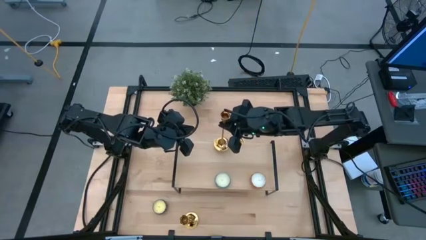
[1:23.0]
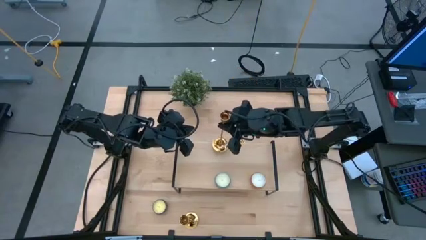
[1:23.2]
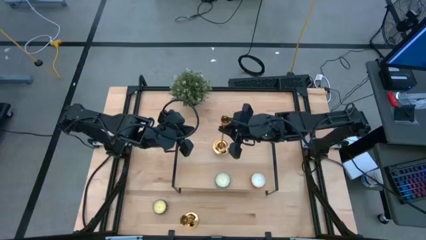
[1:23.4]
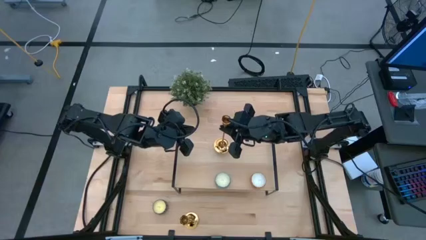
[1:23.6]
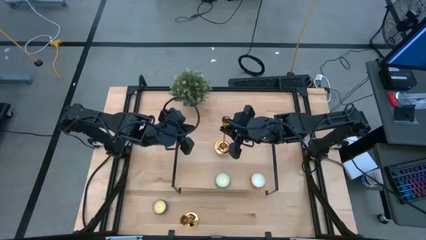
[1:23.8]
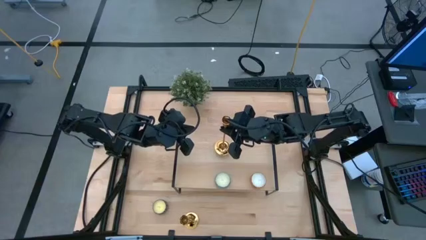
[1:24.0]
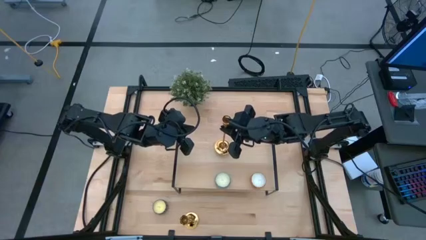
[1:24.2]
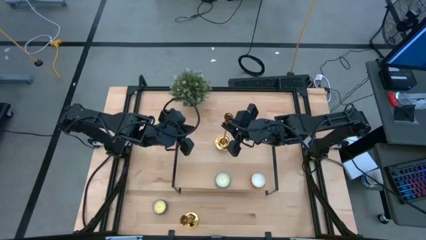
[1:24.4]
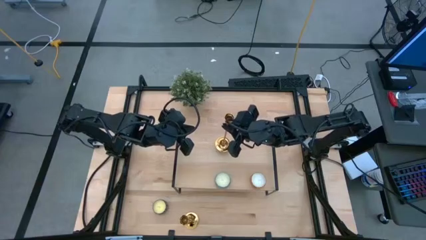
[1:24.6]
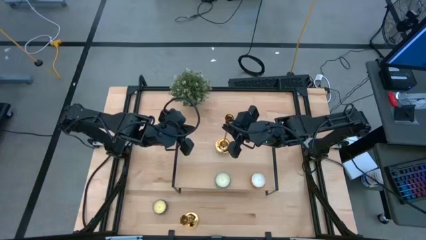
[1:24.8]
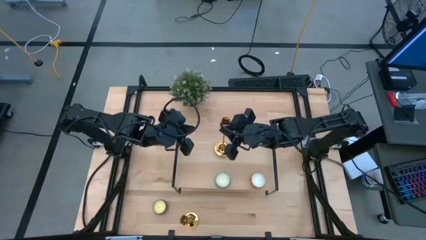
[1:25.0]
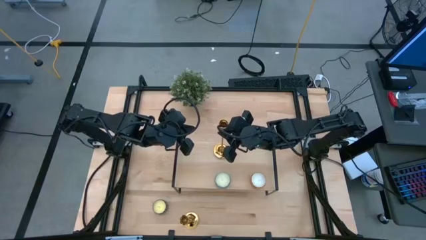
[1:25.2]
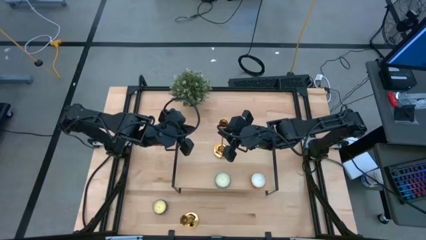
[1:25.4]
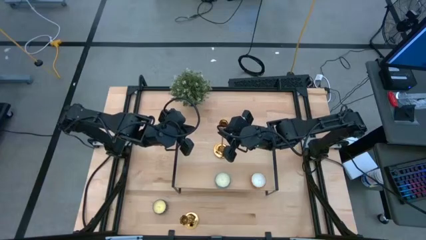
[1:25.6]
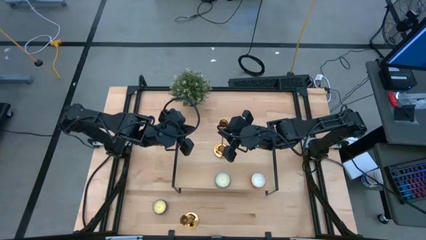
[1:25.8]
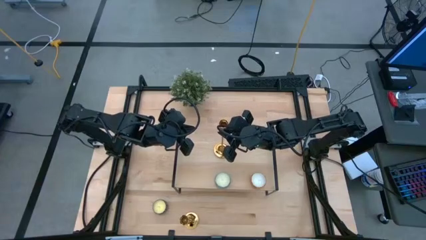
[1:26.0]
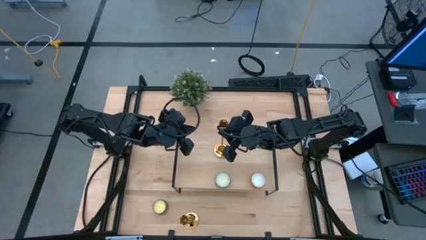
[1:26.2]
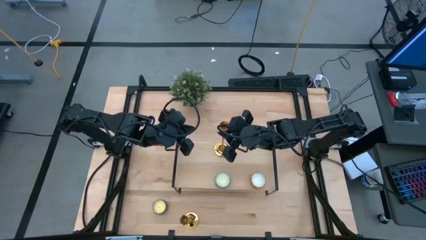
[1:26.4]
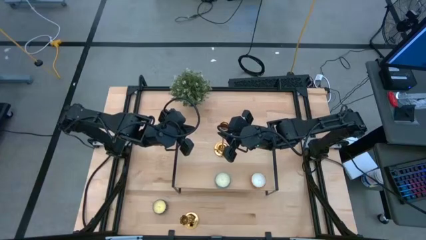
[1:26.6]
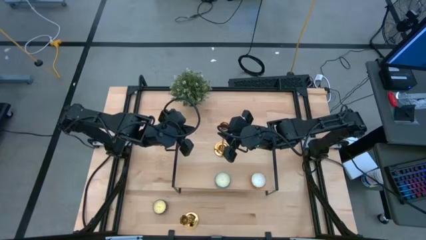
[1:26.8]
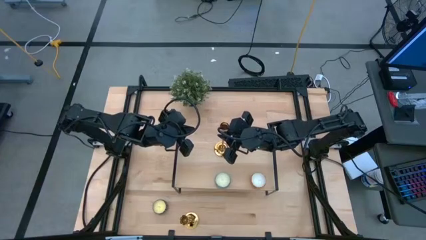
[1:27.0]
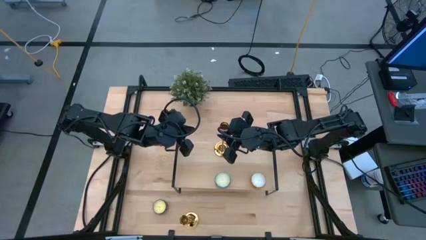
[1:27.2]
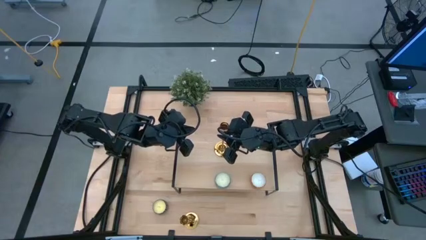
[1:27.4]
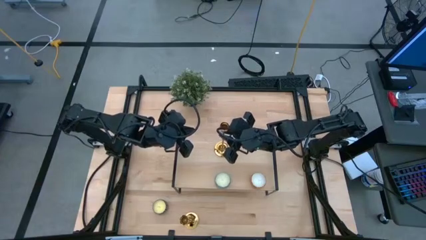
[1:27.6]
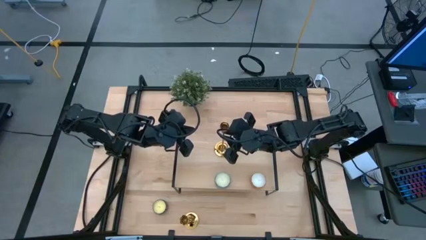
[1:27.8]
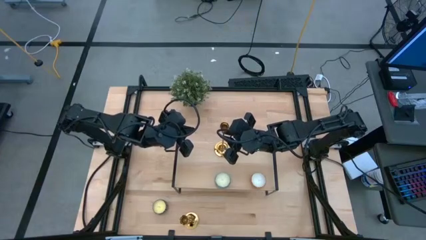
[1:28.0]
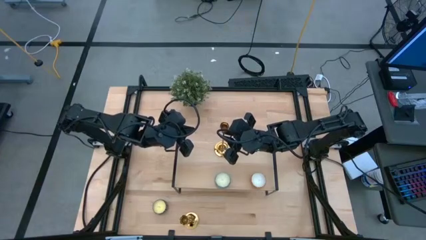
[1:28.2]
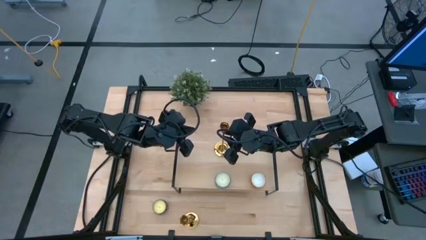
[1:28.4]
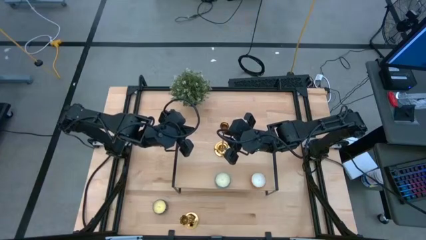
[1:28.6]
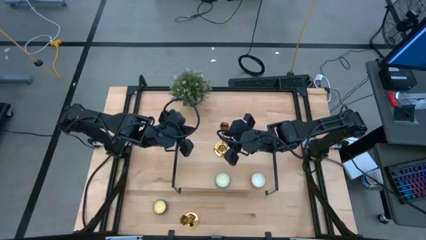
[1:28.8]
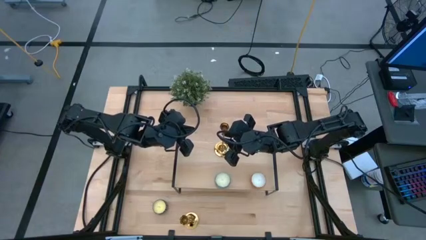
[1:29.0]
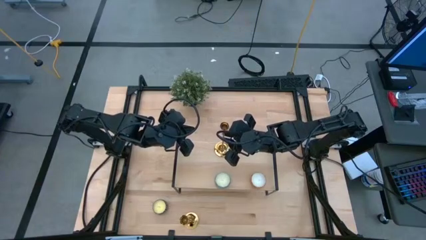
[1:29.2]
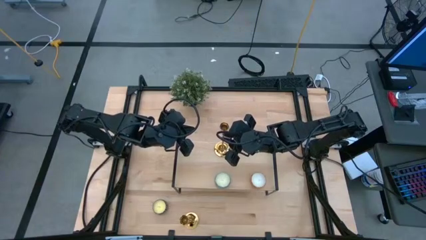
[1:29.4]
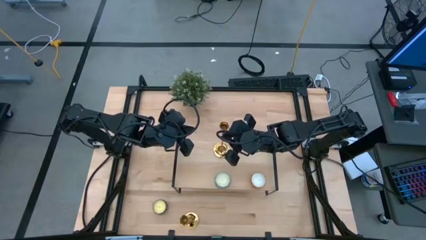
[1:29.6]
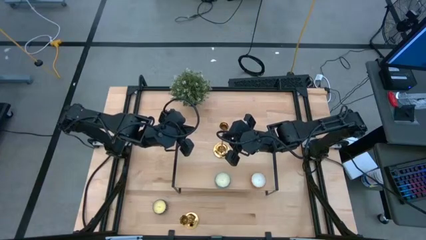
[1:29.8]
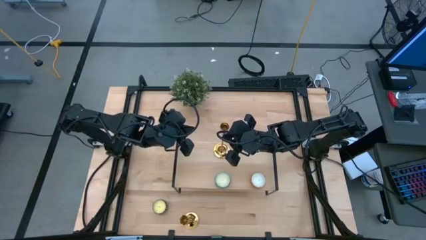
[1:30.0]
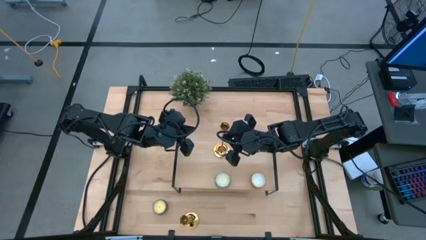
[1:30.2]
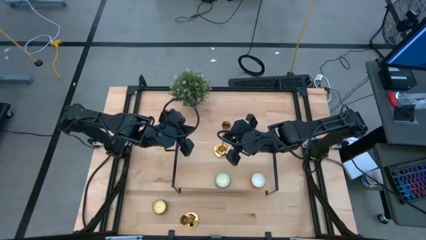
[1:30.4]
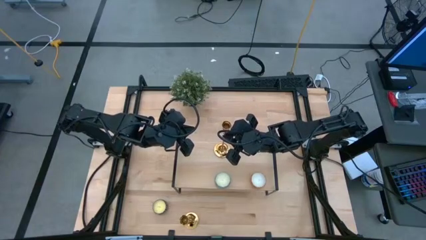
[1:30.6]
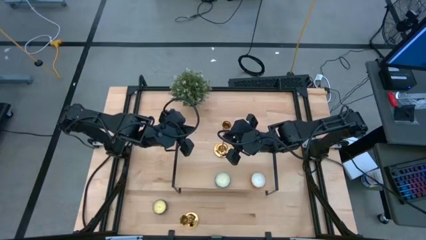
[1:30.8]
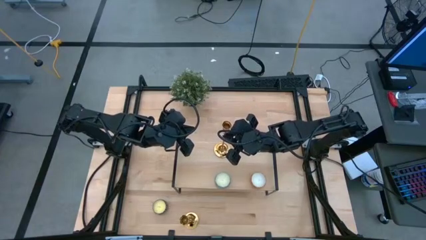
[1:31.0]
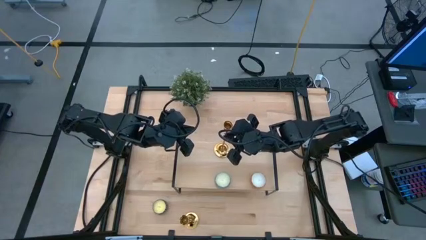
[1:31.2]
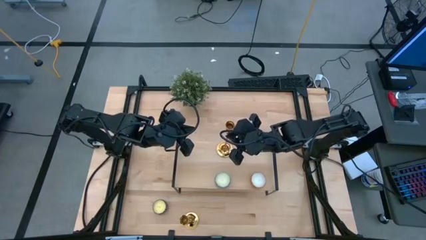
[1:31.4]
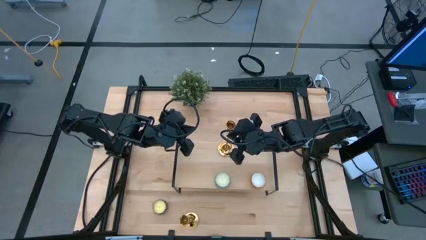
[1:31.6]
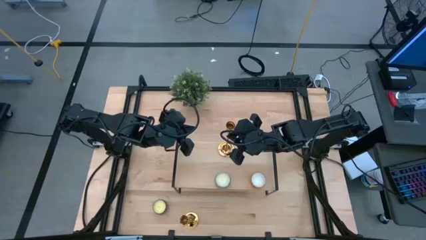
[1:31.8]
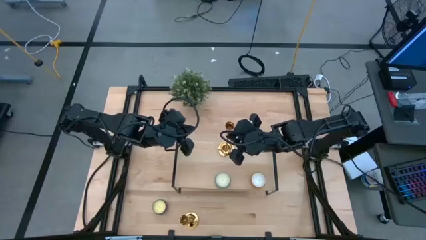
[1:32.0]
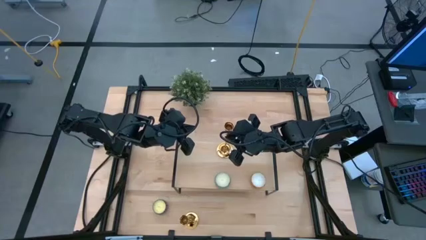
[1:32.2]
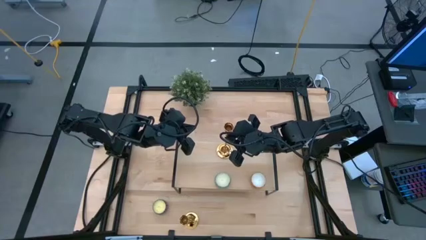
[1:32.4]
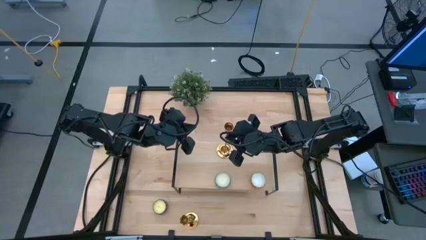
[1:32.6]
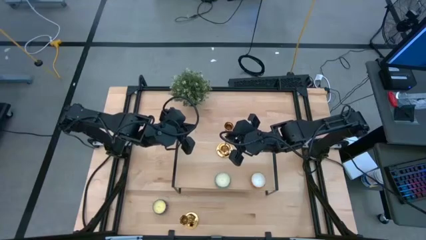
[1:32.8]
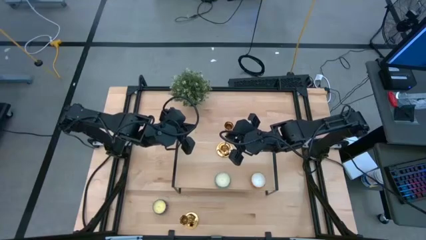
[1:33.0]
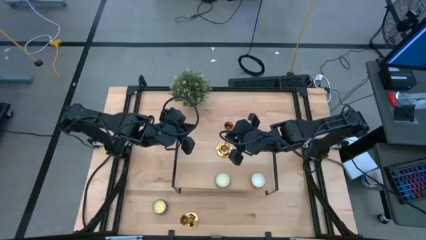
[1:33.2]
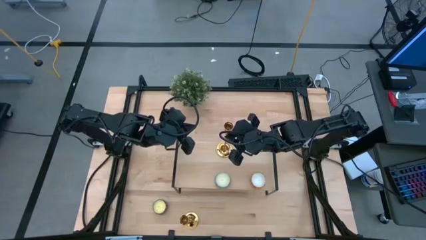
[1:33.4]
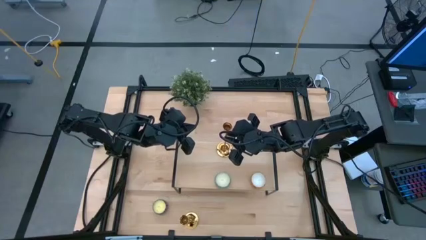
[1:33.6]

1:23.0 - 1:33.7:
Task: Pick & Place candle stick holders
Put the top left candle holder on the shelf

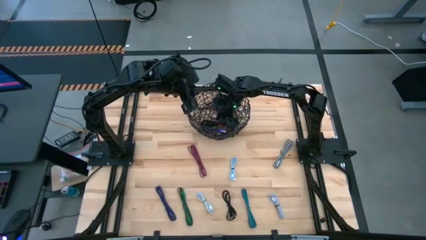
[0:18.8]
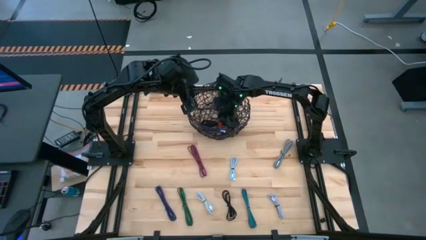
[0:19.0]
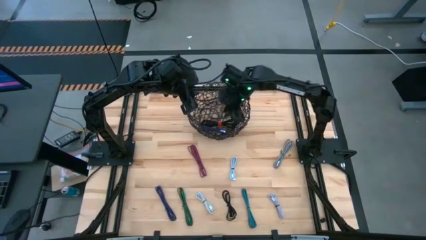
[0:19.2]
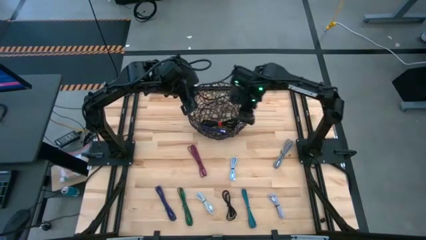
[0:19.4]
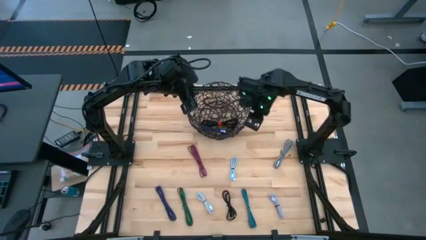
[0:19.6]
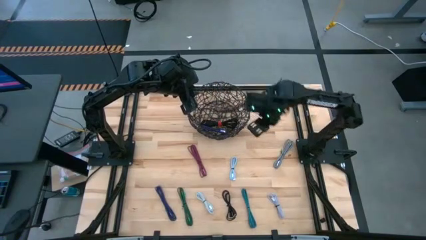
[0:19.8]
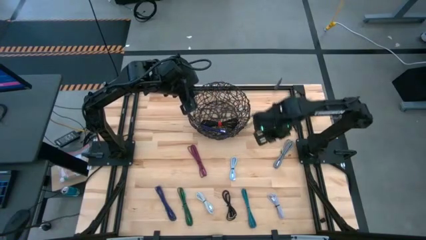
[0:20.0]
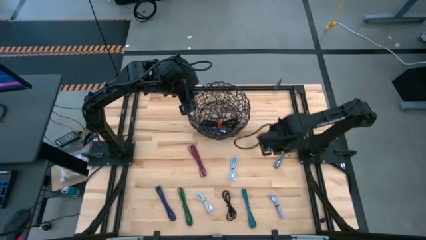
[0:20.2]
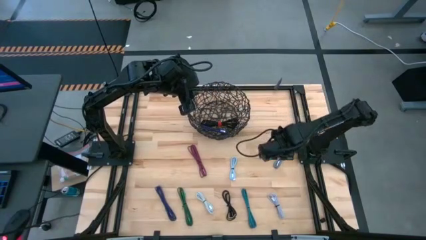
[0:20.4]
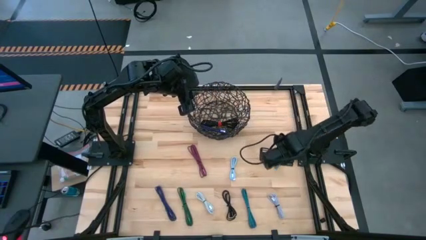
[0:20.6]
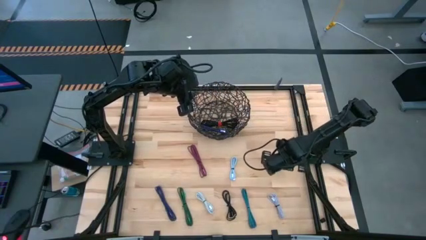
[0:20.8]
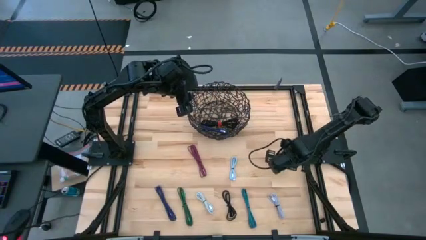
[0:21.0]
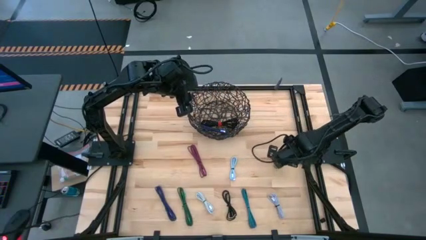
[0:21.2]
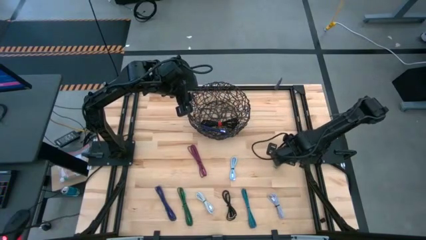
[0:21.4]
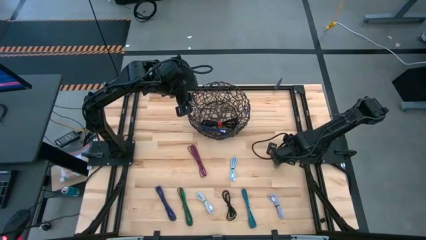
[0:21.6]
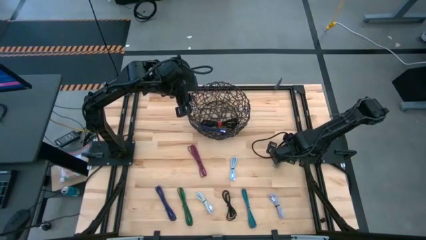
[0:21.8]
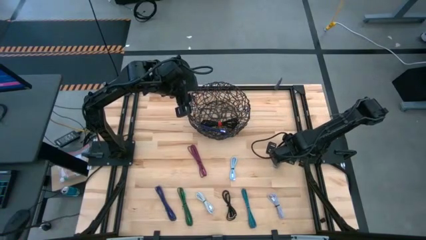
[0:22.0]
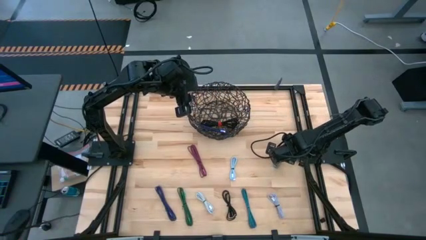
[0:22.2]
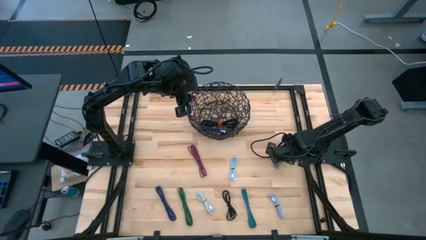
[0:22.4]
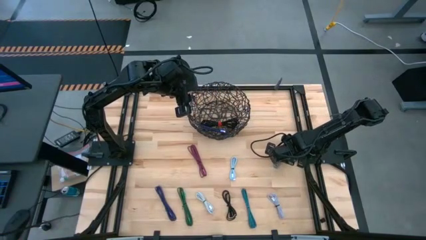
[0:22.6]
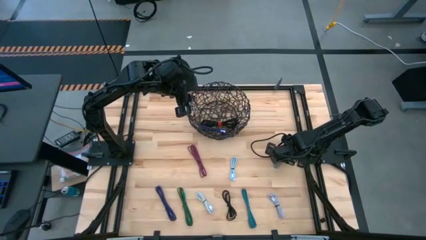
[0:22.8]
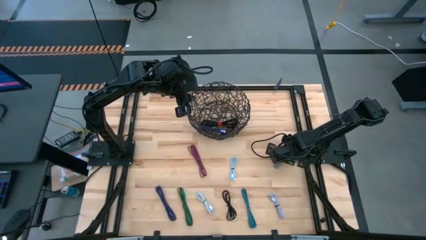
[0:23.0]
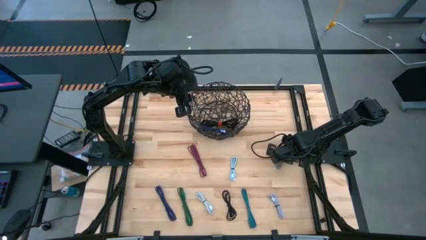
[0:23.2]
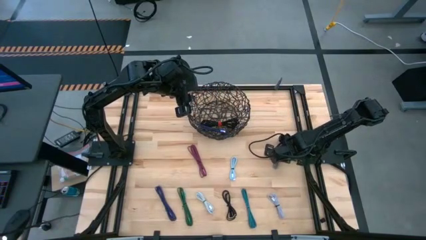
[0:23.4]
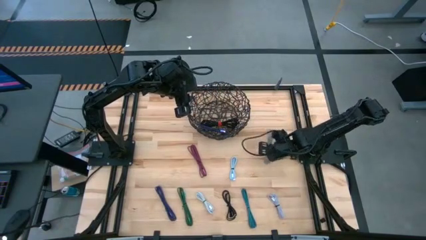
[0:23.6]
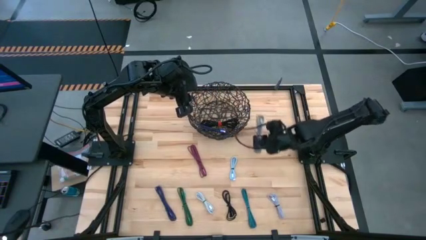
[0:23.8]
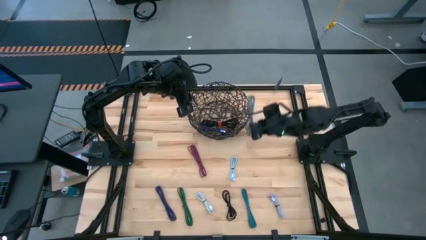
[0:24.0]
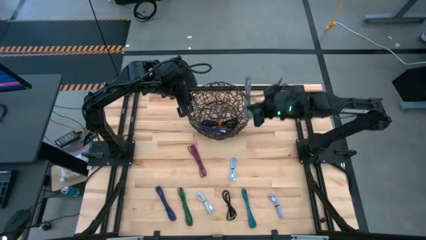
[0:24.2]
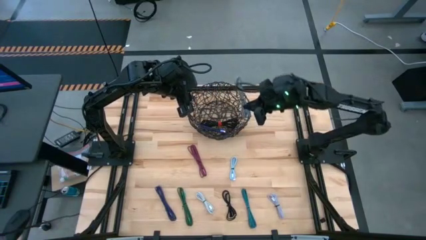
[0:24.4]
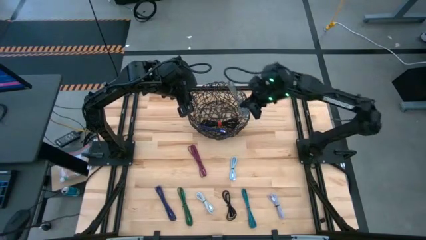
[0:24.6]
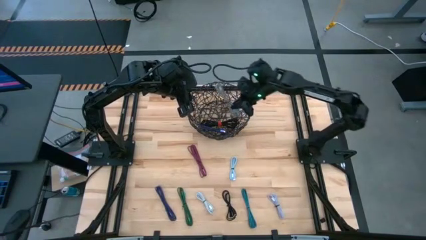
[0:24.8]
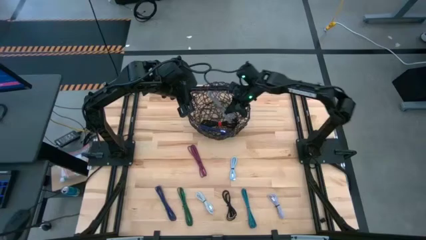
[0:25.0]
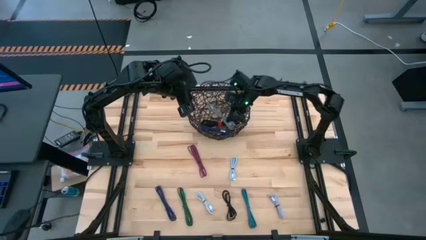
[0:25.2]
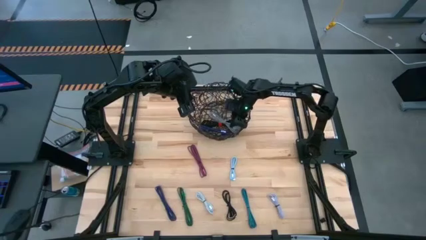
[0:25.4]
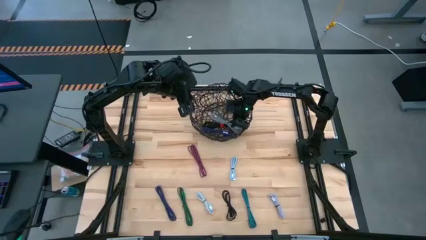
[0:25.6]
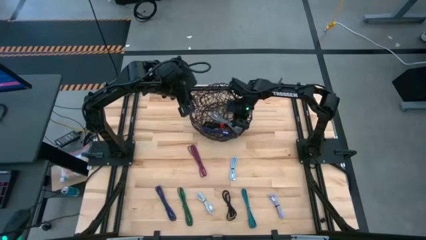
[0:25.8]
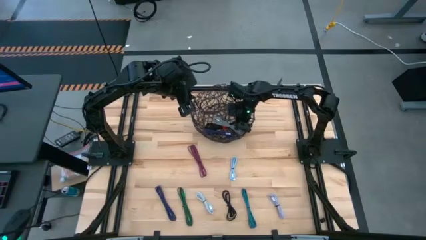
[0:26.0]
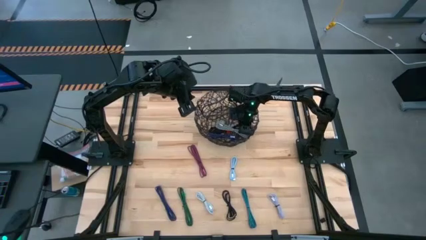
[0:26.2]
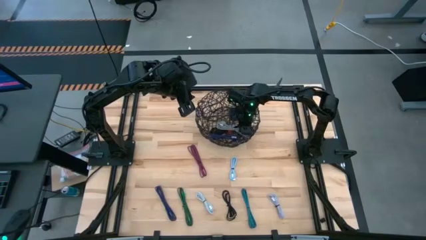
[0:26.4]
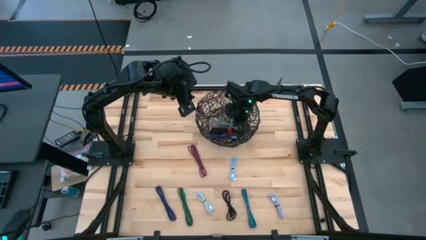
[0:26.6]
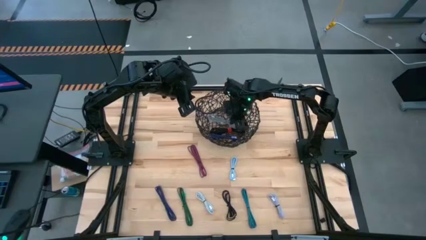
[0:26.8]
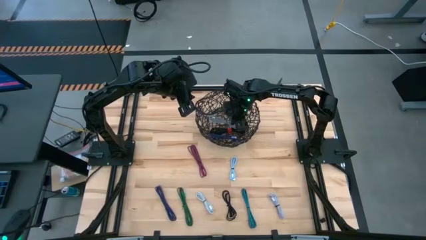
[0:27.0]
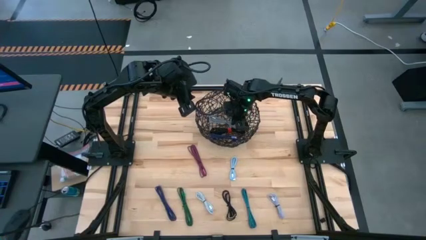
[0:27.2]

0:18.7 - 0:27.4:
Task: Pick and place USB-C Cables
Put the black and white charger cable into the black mesh basket
